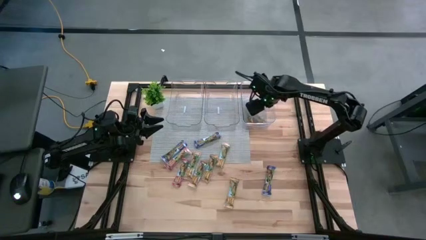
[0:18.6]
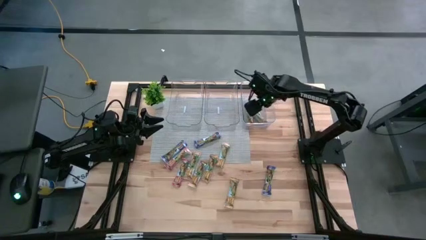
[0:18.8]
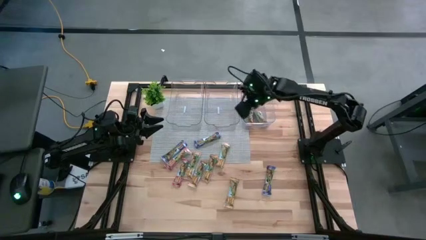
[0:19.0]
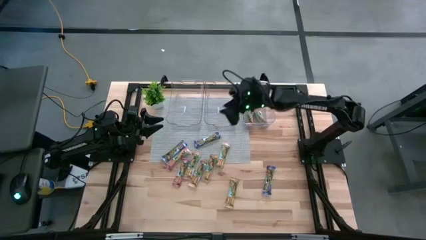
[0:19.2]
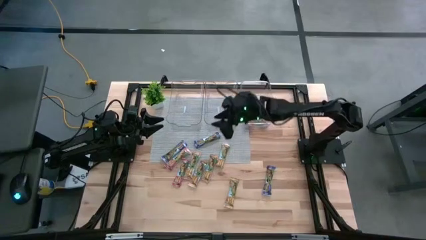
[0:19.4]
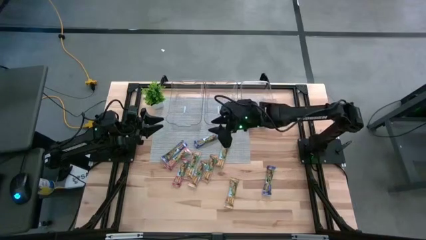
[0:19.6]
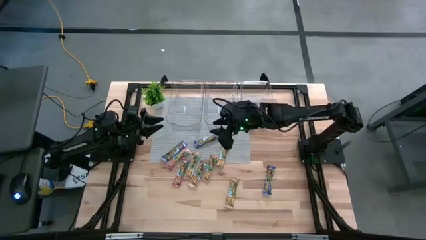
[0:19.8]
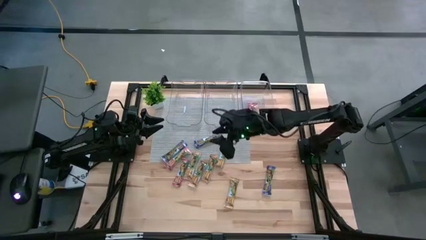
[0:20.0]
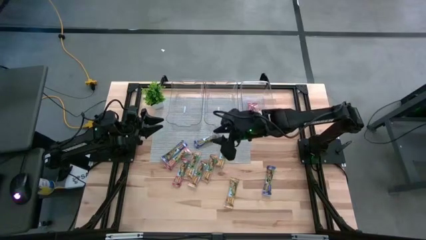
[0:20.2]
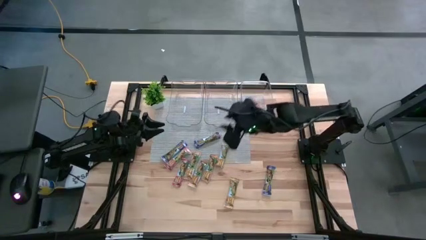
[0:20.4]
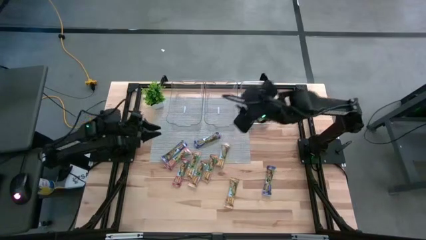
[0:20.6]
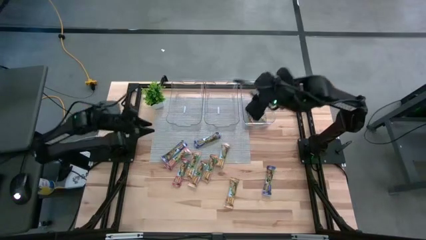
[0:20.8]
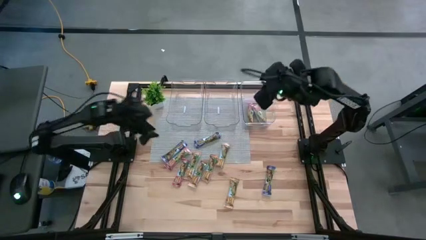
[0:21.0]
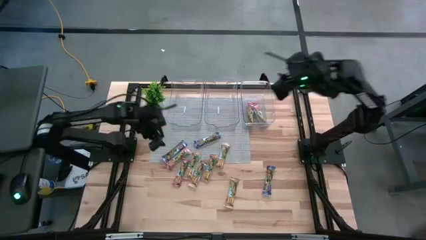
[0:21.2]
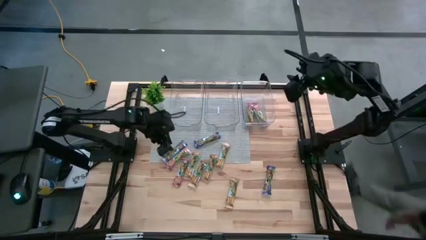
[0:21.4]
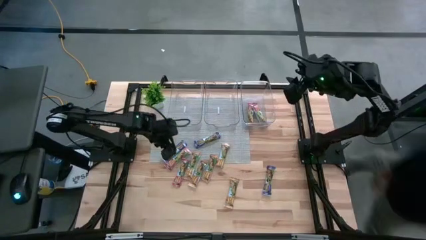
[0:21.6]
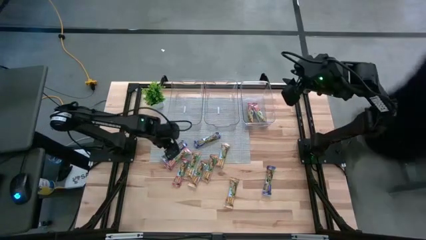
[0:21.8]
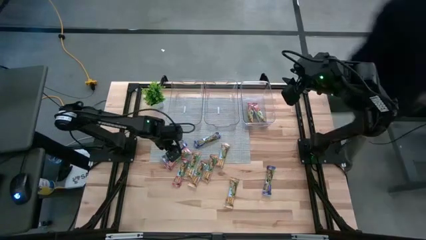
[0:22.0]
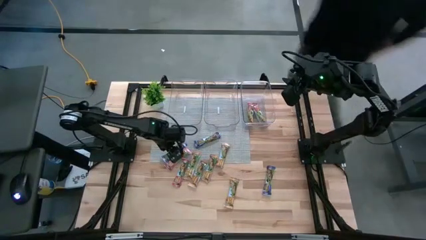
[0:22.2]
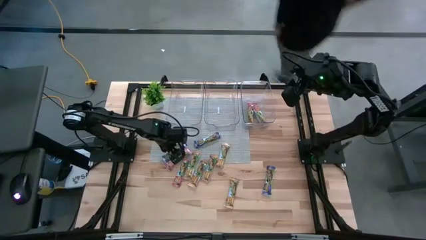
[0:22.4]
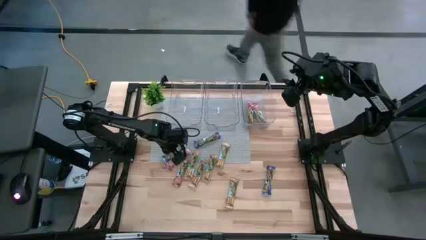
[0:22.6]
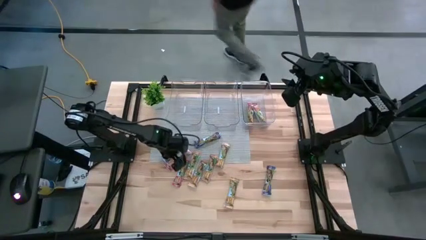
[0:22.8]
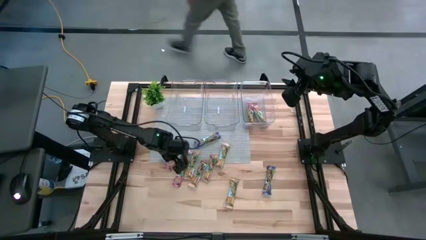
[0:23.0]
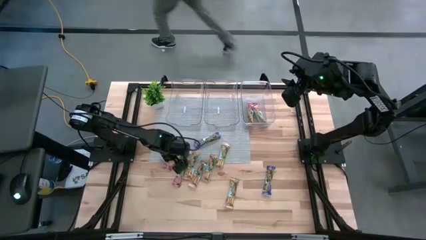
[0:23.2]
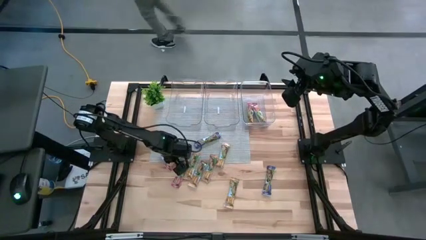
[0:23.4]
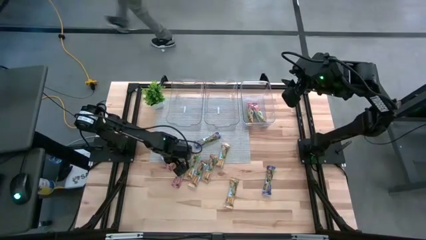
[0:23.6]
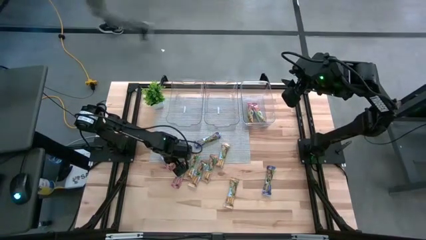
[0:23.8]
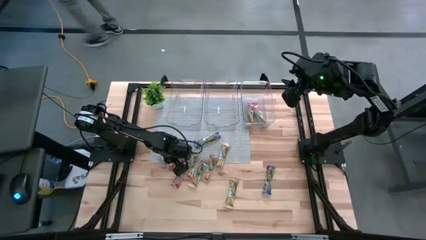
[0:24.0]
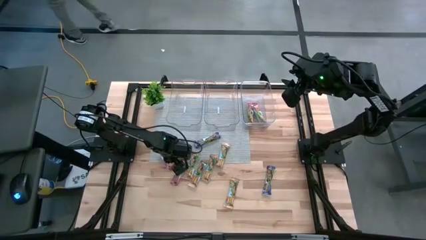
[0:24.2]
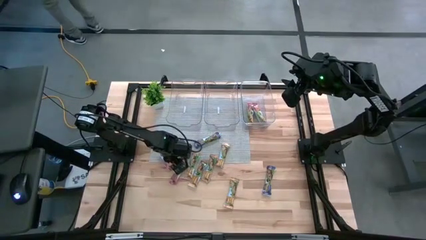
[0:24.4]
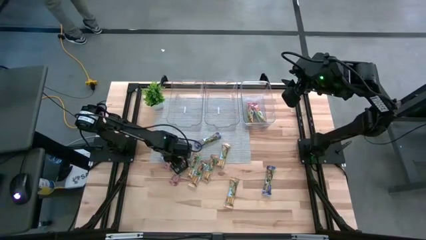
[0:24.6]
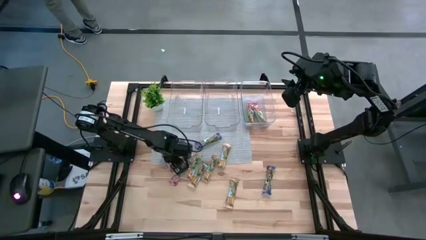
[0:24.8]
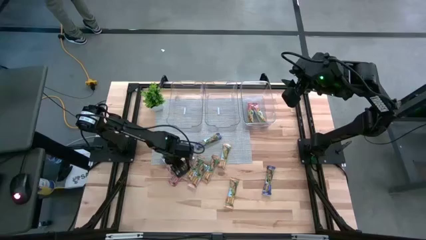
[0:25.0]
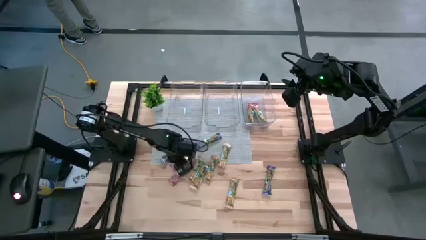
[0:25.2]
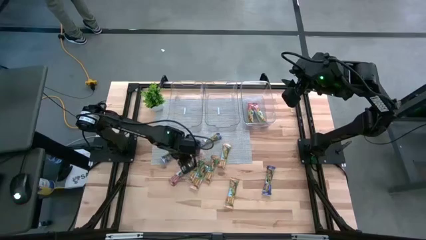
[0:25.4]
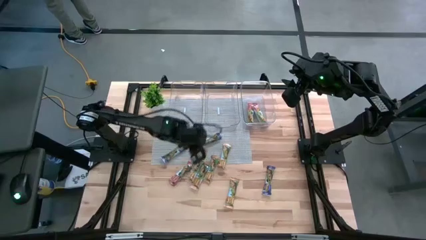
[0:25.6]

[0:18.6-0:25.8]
Task: Pick and place Granola Bars by type
Put the red granola bar into the right transparent bin

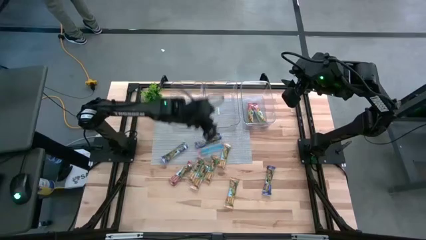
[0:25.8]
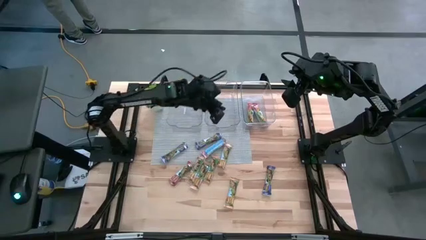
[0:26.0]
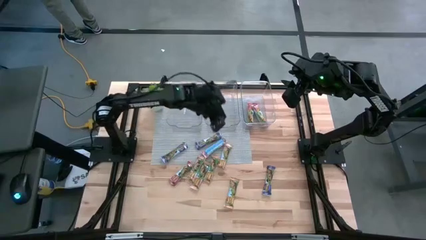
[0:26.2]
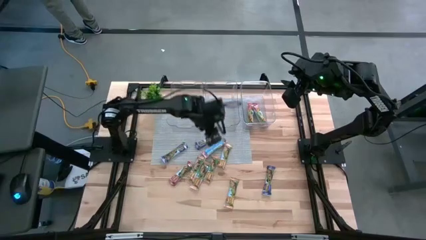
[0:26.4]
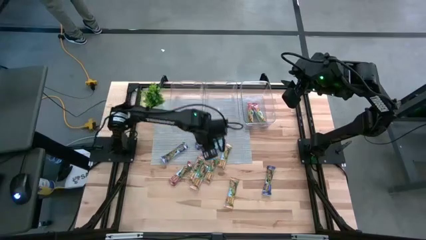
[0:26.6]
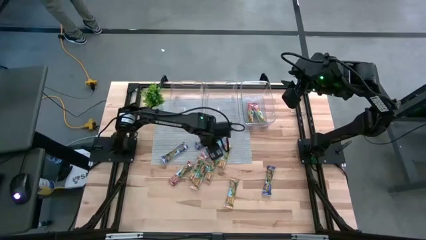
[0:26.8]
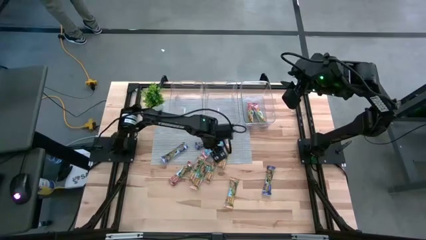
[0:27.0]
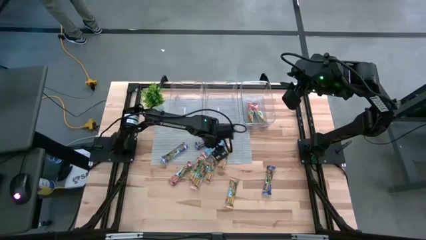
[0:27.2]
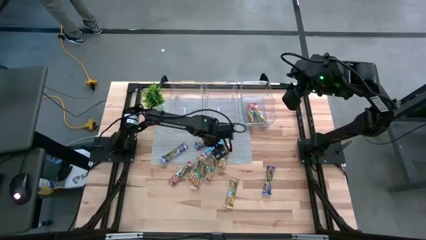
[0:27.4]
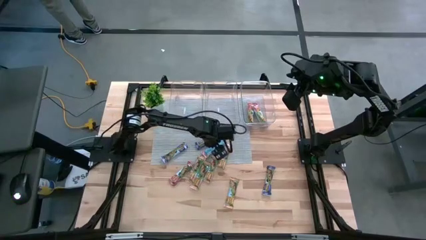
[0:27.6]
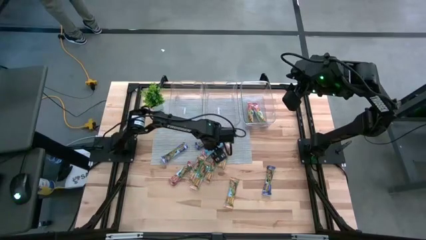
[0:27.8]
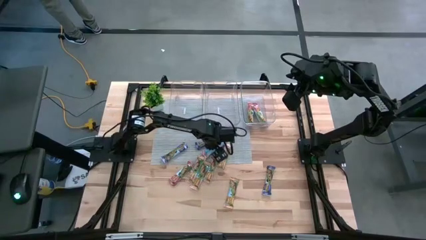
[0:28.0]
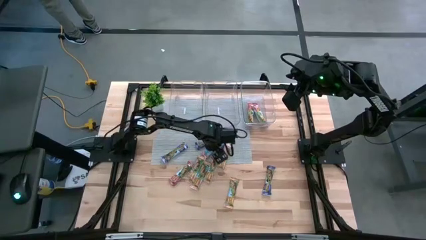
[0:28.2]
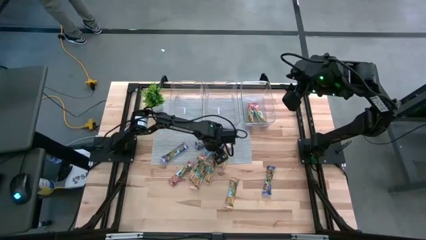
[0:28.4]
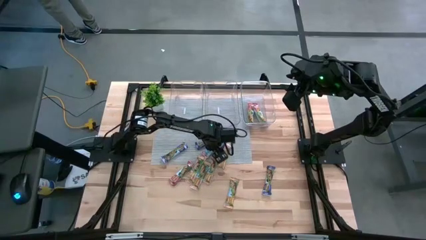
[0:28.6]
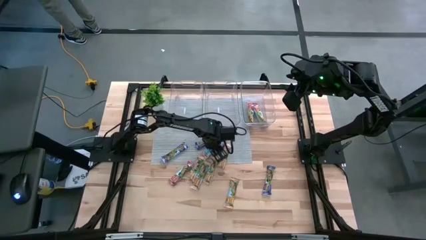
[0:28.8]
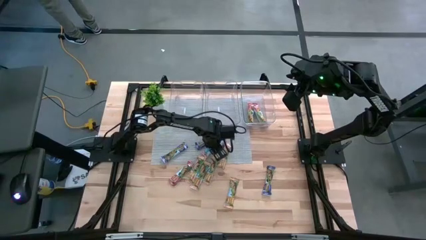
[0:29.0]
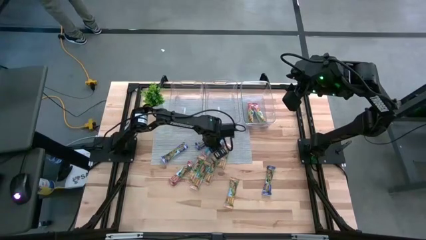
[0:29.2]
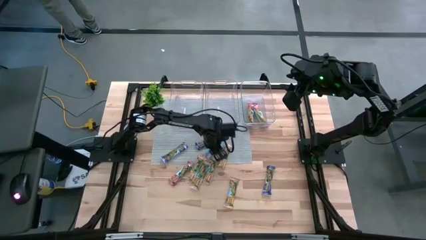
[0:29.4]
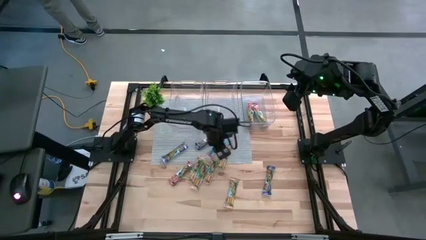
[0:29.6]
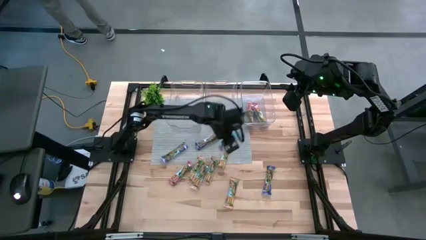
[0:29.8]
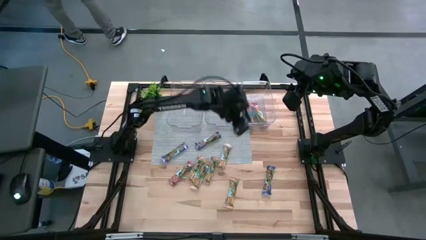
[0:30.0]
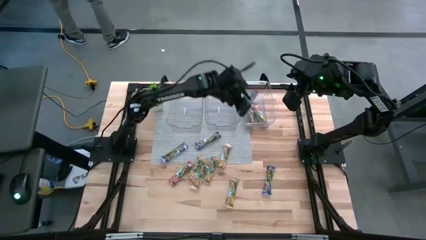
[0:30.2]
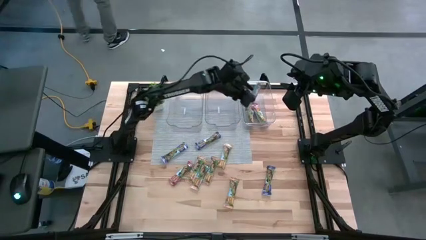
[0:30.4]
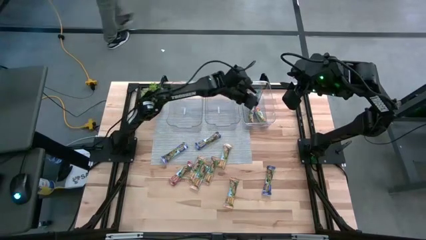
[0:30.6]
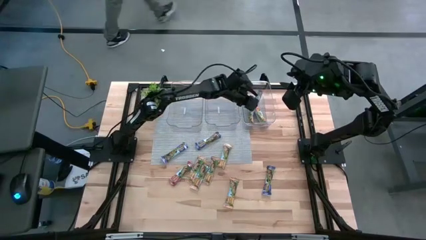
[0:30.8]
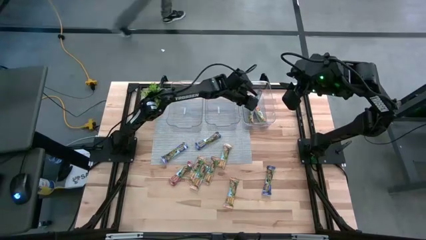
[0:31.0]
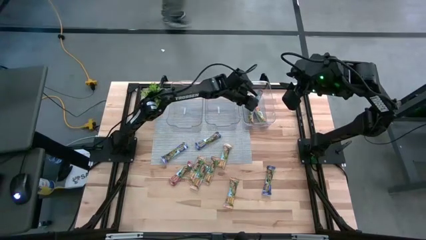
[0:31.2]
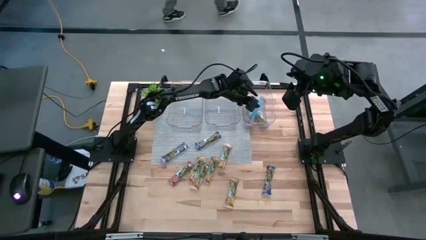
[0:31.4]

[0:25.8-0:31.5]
Put the red granola bar into the right transparent bin
